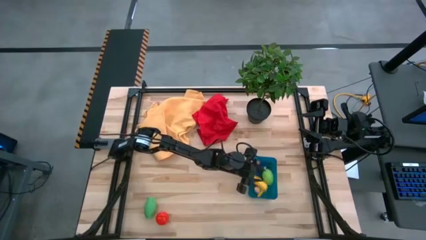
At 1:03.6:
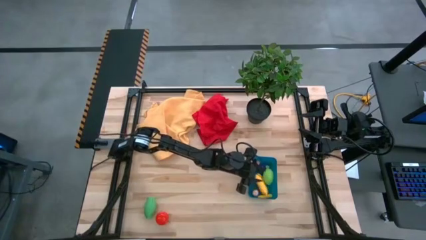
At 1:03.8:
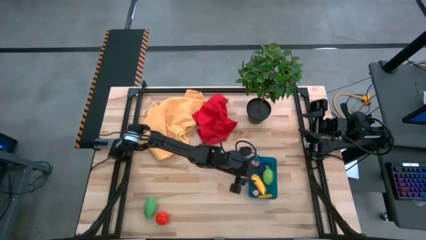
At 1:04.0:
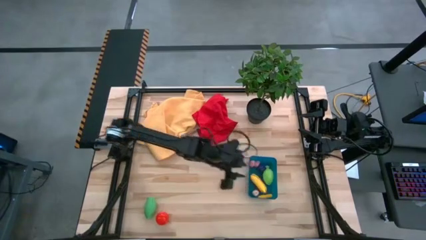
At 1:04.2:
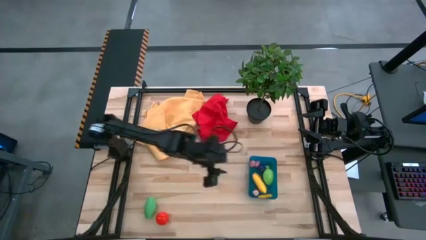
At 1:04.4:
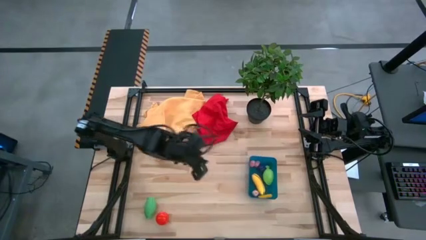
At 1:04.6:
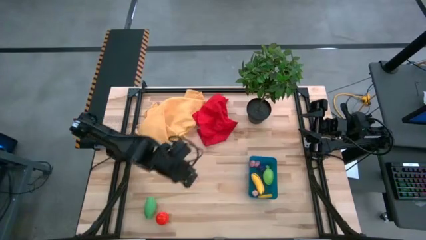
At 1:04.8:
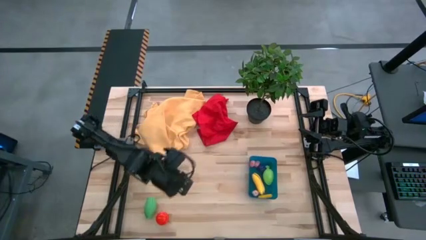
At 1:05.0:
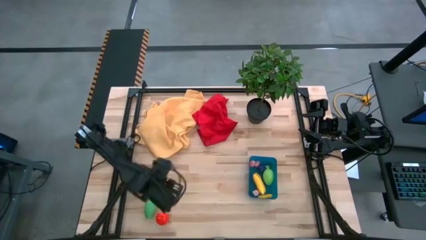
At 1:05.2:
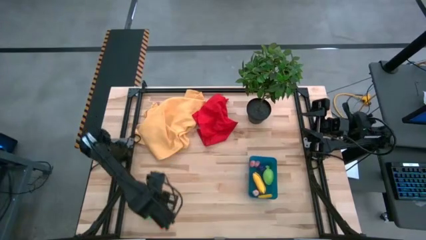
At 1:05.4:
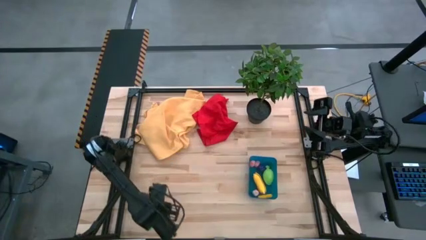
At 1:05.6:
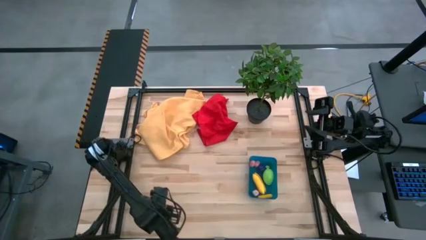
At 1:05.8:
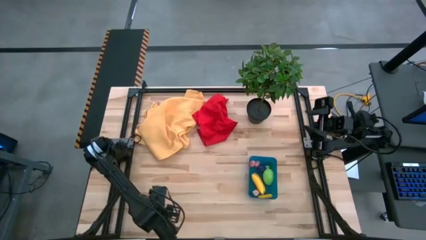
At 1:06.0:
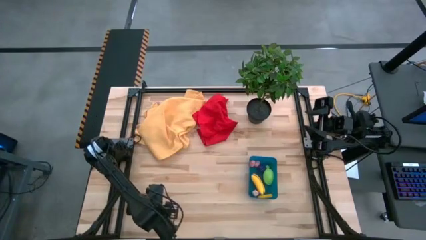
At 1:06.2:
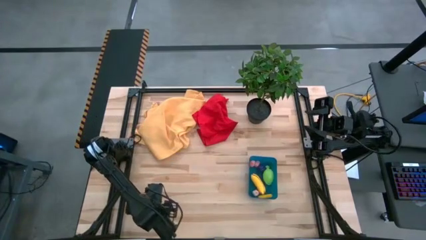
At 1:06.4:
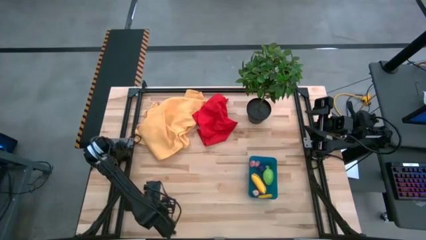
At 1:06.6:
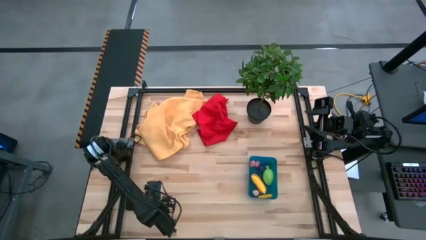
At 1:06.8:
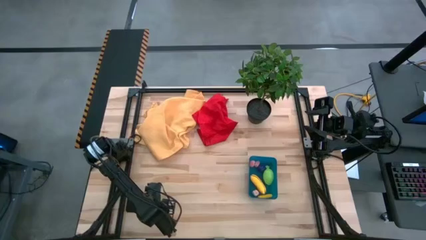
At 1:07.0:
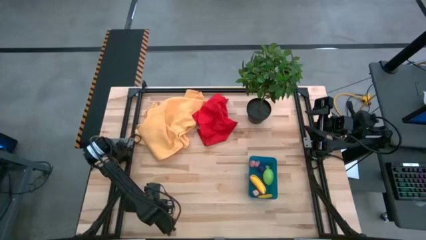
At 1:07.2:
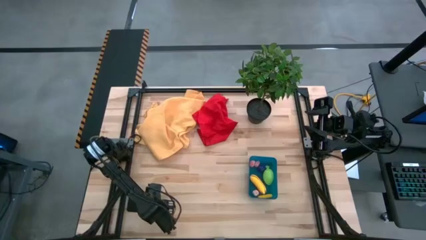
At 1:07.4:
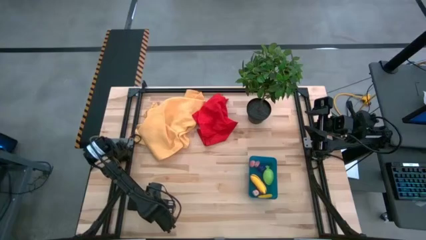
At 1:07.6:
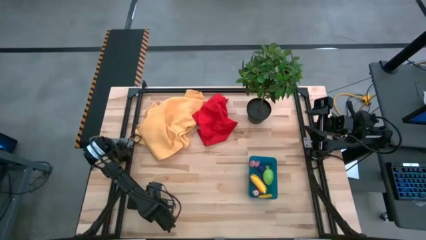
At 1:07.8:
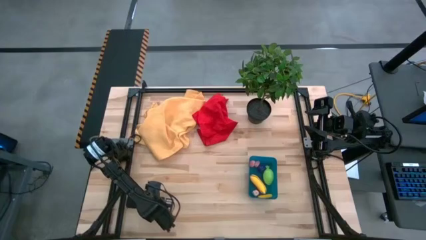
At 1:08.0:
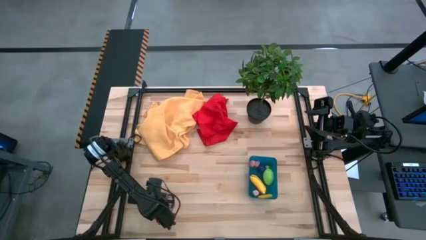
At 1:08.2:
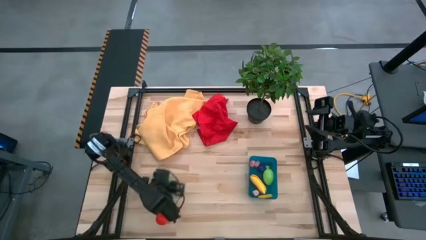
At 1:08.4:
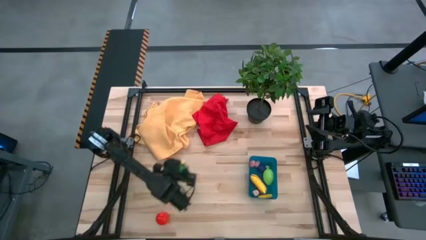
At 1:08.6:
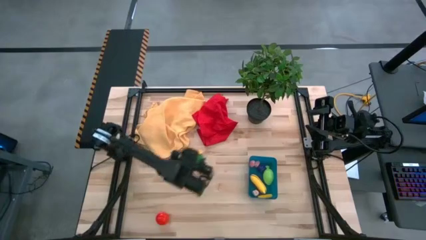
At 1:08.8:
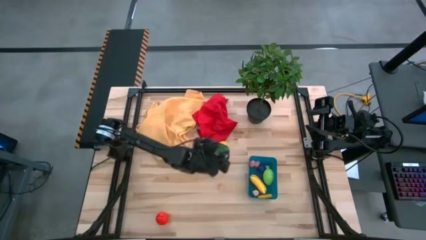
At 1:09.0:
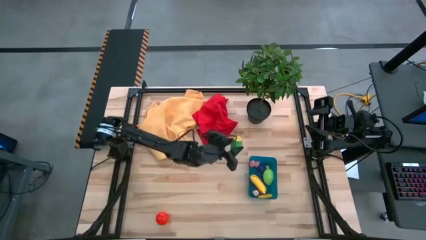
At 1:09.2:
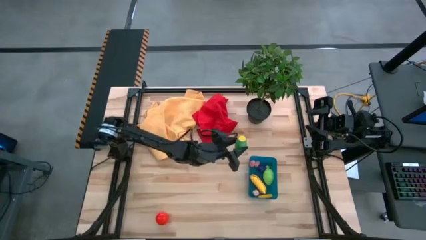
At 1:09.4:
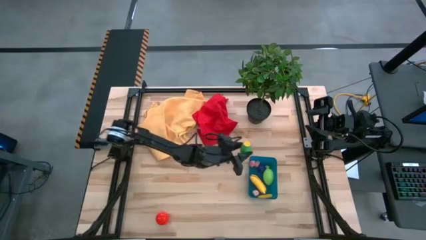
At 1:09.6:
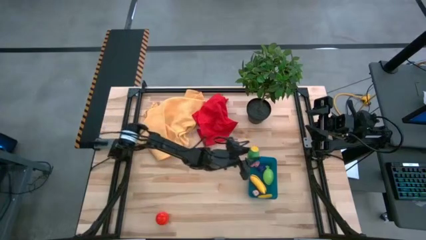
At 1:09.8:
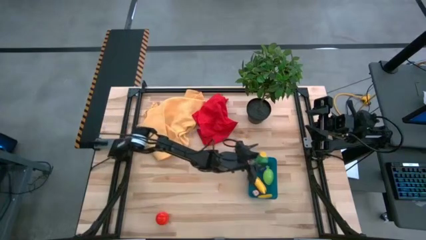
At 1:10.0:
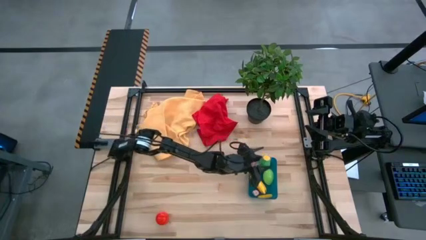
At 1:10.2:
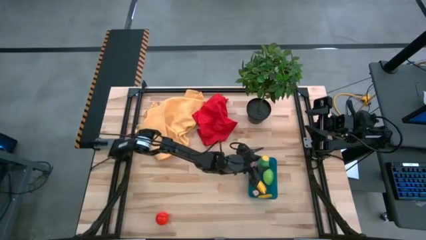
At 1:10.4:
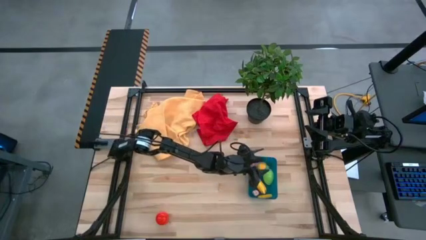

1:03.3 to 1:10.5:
Task: Pick and placing Produce into tupperware
Put the corn into the blue bin

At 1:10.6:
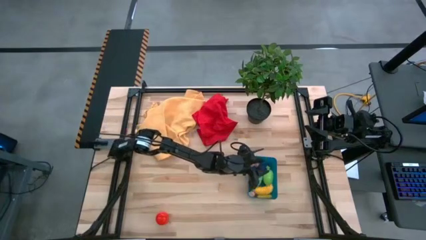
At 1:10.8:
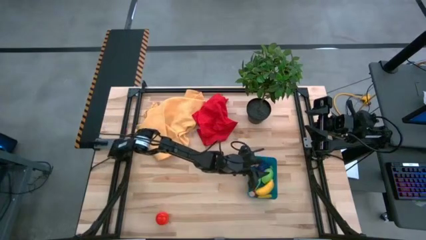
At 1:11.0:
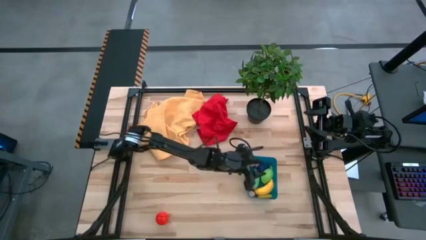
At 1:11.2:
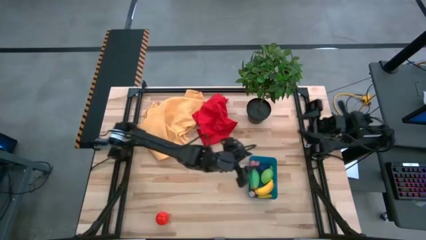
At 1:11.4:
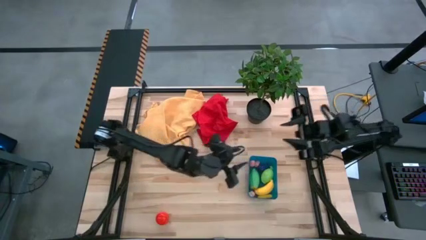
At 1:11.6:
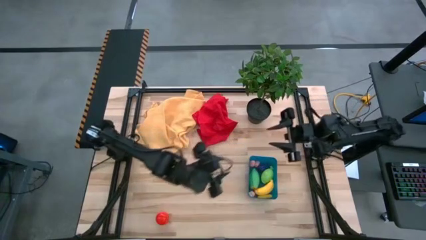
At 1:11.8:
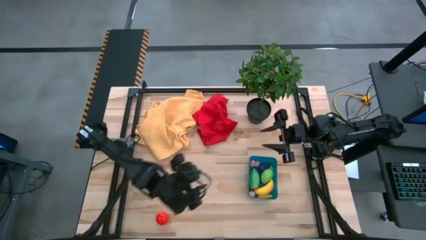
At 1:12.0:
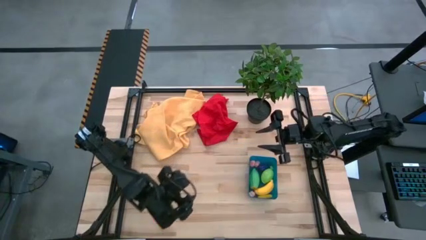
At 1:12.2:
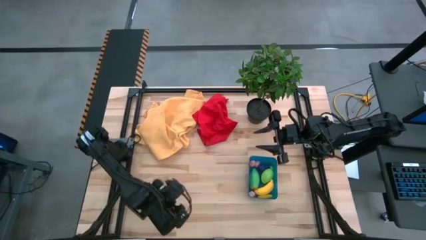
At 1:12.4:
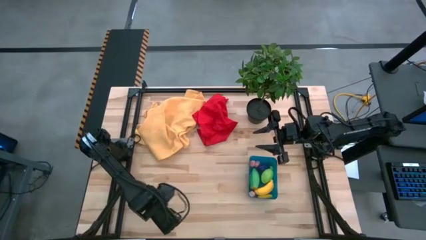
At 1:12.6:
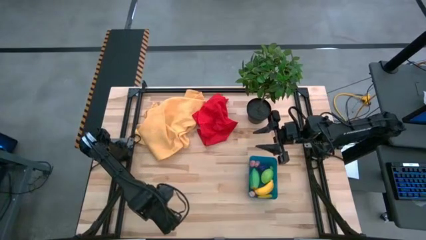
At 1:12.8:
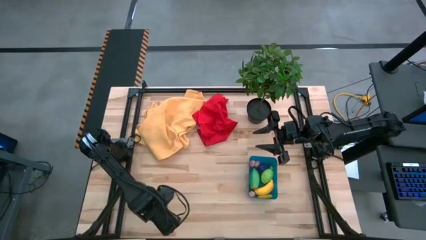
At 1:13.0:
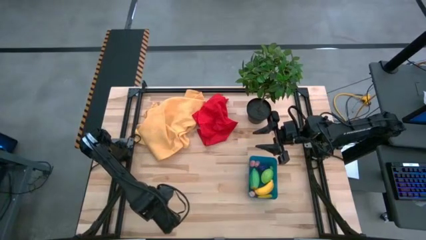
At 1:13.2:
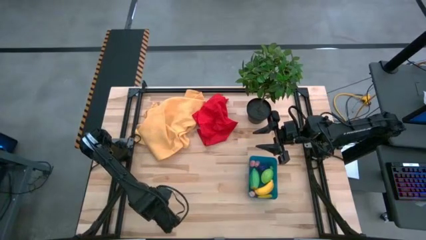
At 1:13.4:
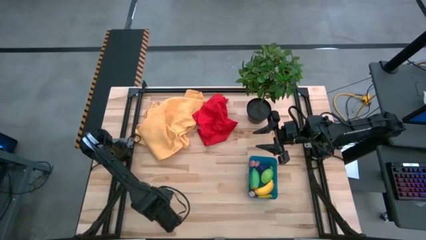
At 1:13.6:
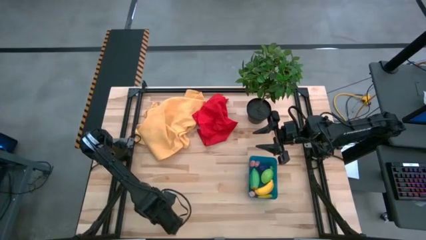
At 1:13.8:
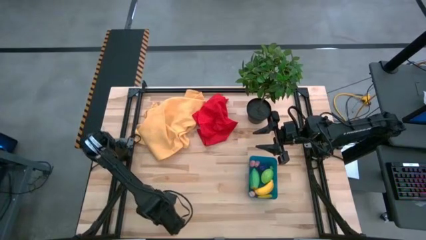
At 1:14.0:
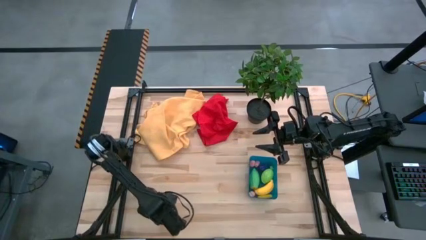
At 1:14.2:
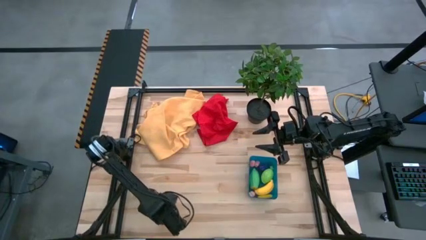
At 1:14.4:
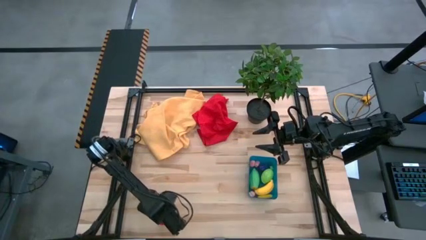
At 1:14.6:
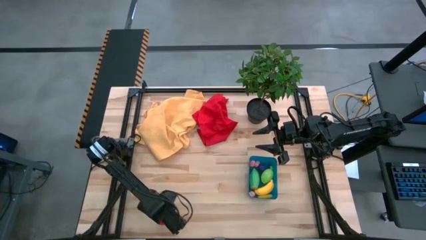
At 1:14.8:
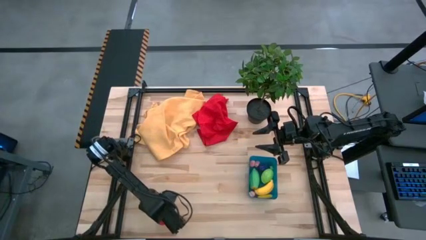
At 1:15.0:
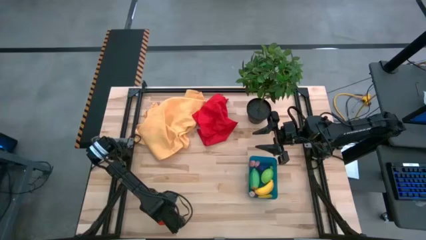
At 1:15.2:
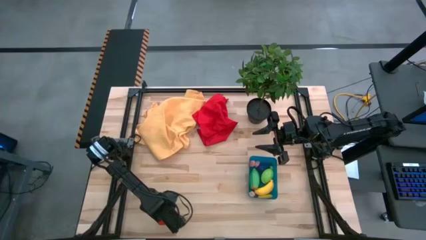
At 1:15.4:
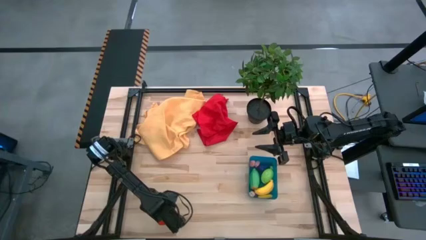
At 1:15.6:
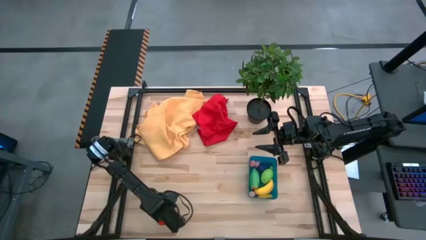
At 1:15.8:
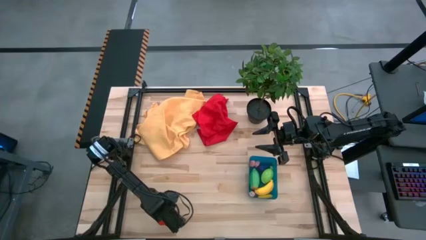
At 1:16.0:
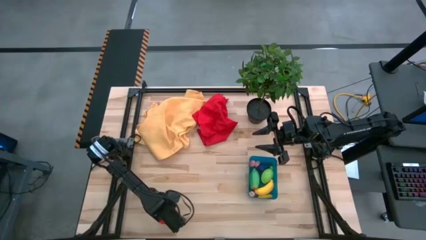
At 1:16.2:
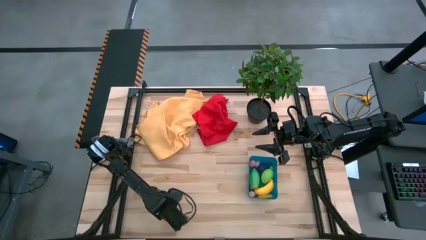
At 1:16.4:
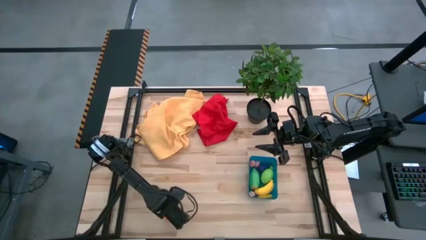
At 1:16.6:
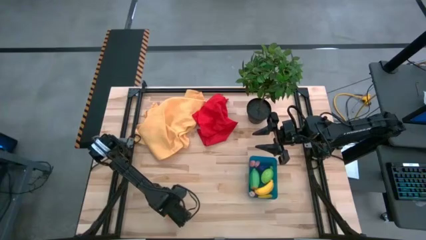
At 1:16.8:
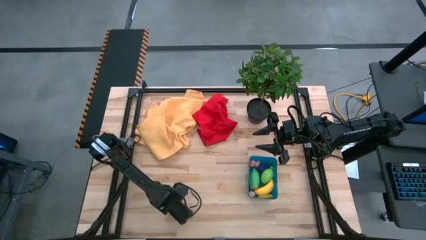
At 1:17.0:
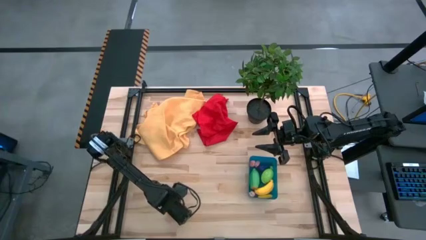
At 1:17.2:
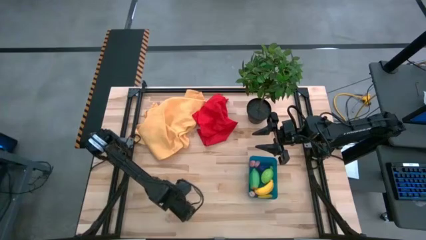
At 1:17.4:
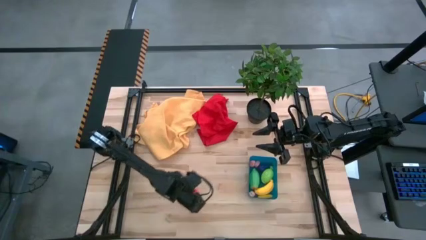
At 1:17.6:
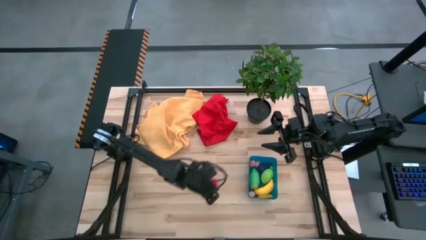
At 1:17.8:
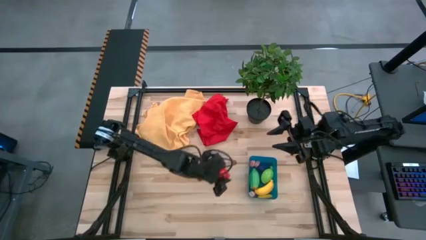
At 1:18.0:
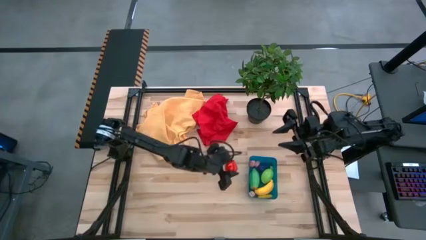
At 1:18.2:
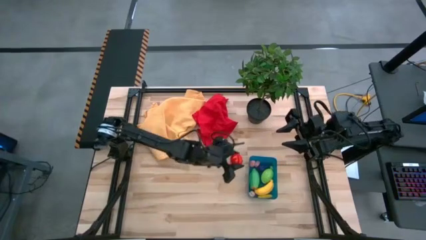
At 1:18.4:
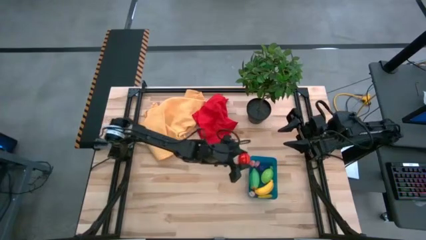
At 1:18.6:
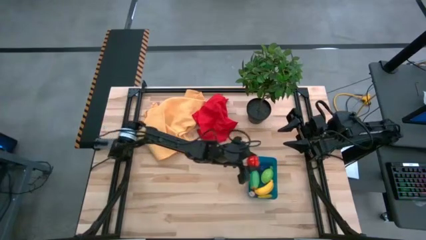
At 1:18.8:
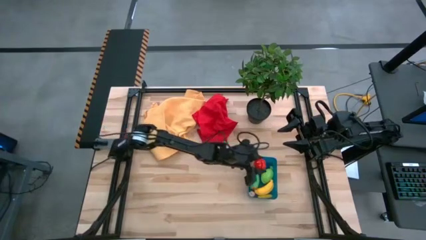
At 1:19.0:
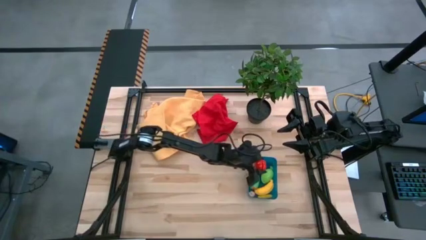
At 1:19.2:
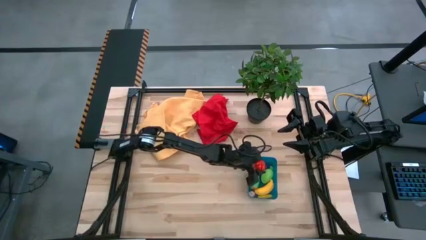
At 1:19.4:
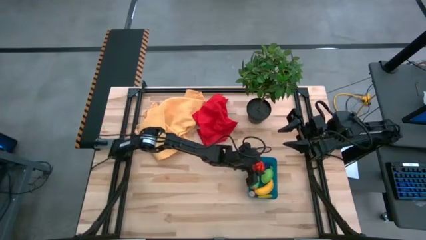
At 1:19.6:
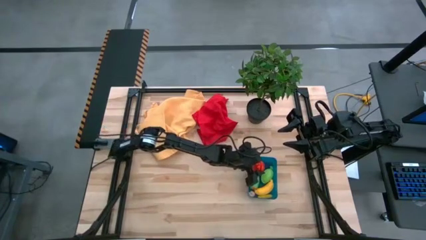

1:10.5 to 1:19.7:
Put the tomato into the blue bin
